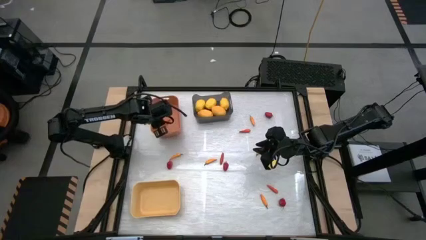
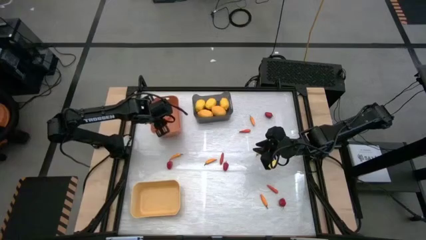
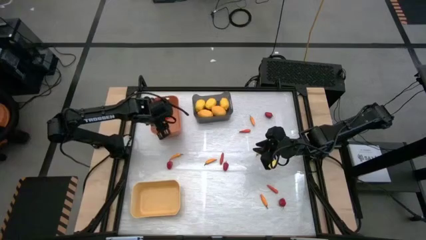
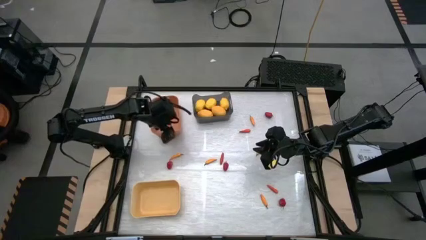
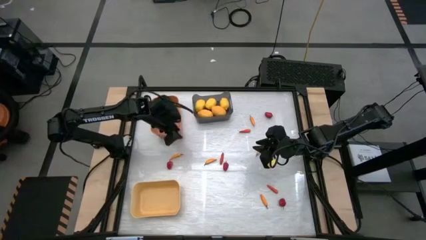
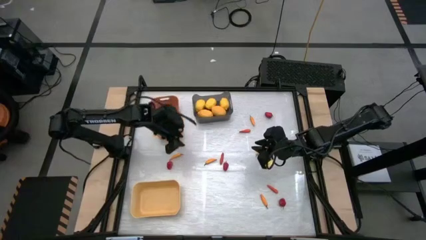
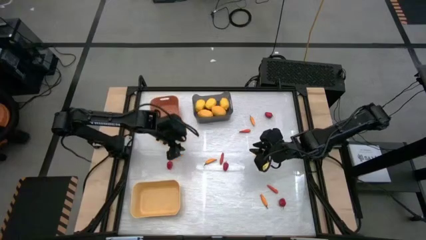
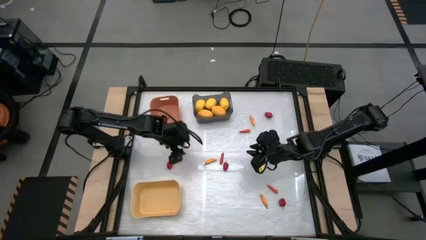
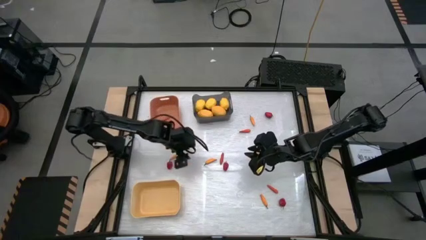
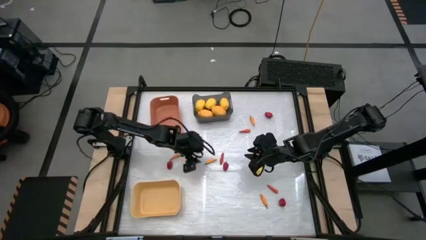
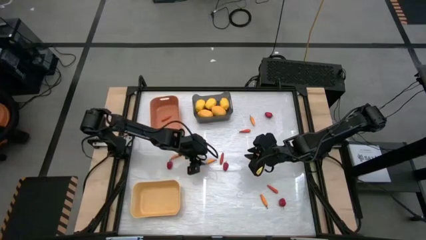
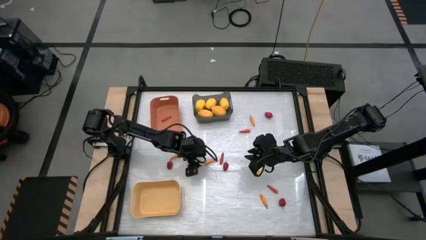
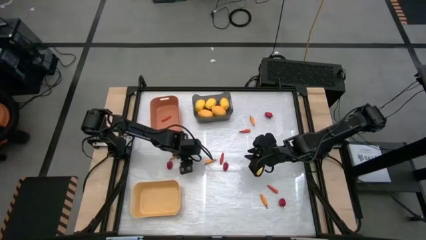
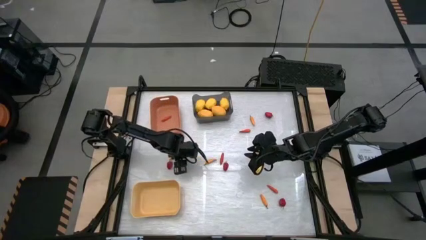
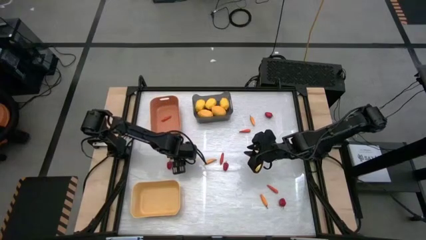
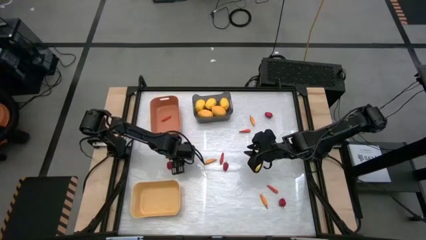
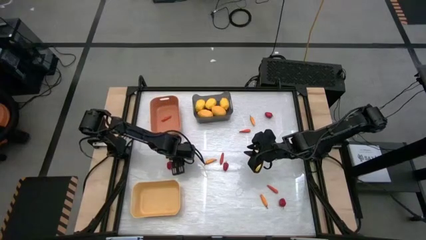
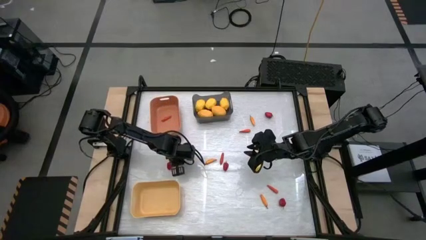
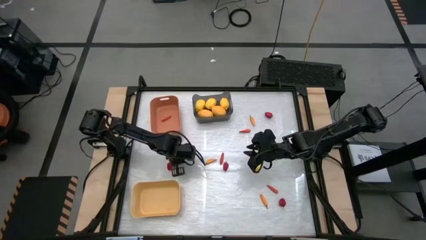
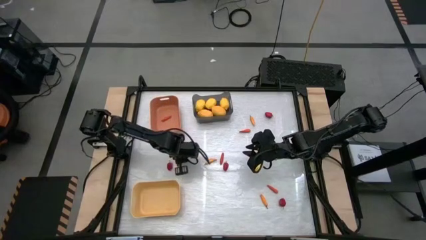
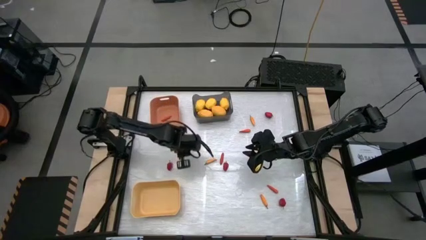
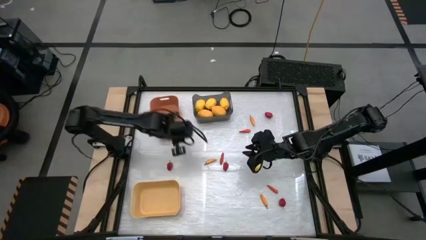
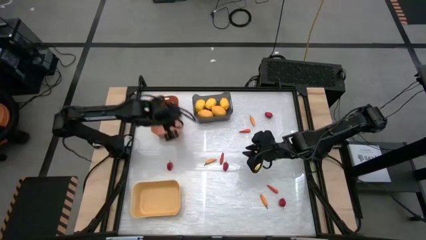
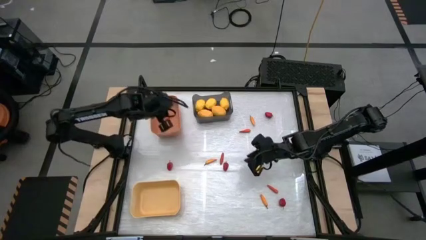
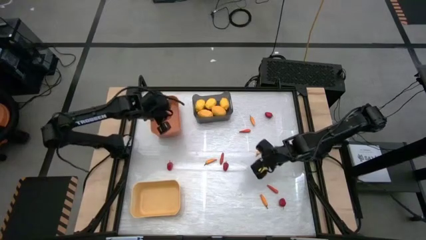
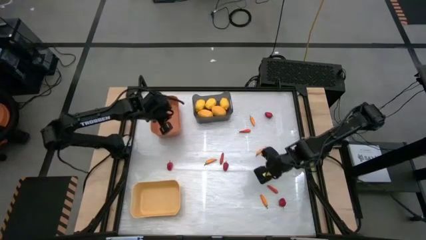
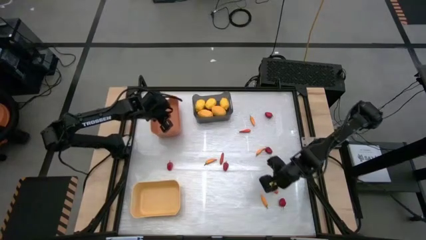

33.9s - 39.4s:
Task: Sort produce into baskets
Put the yellow chili pepper into the orange bin

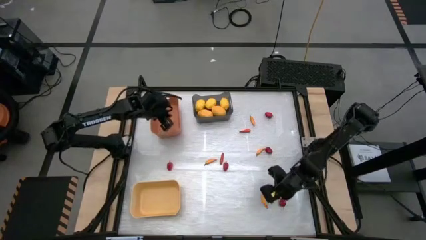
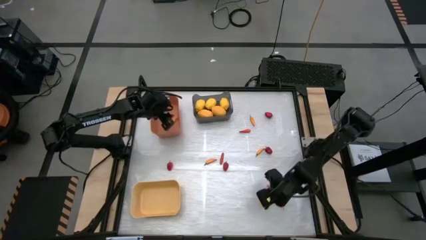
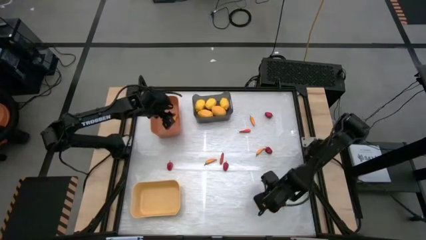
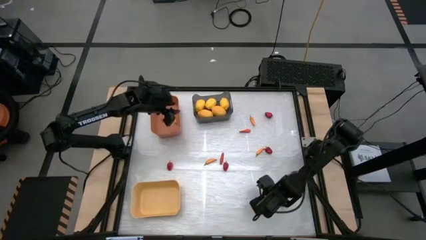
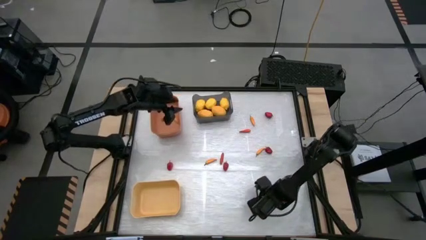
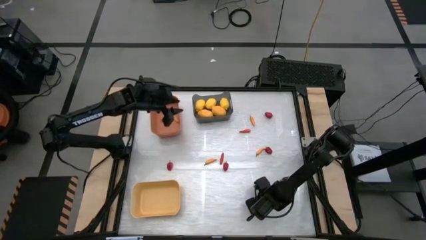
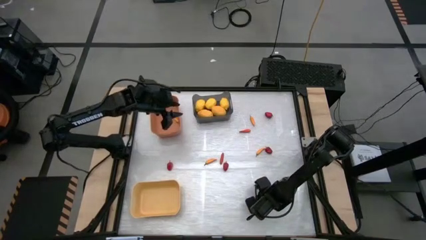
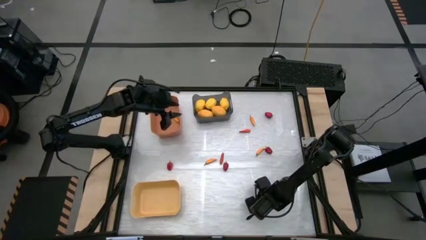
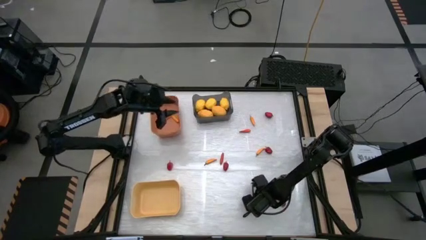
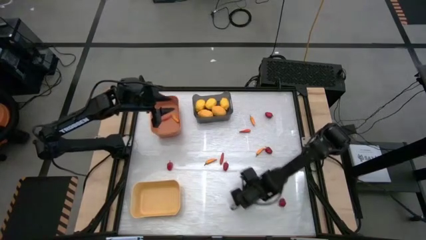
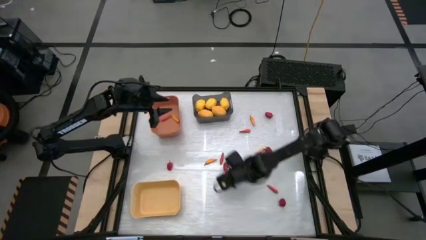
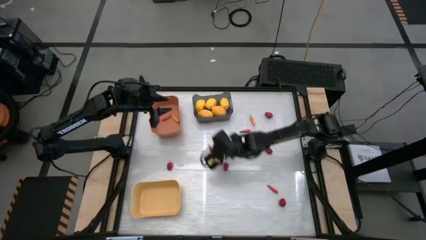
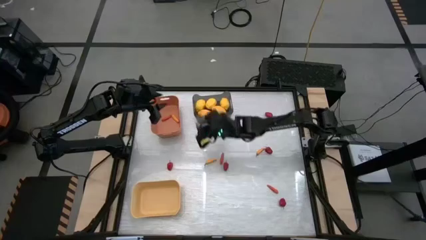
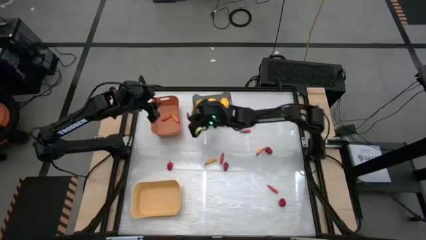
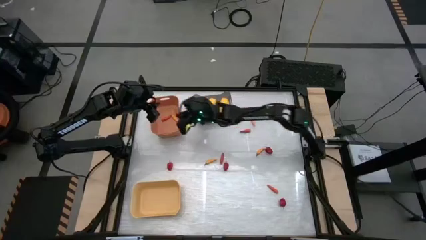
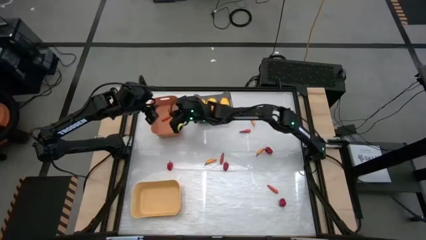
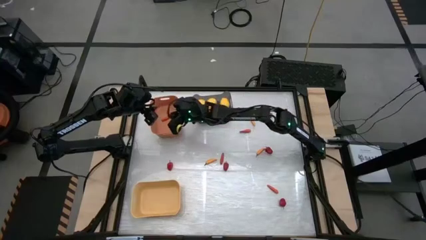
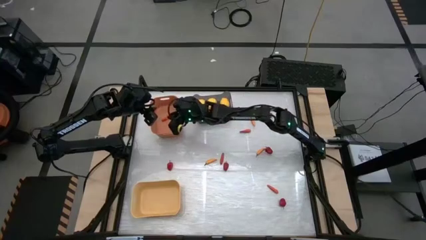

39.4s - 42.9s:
Put the yellow chili pepper into the orange bin

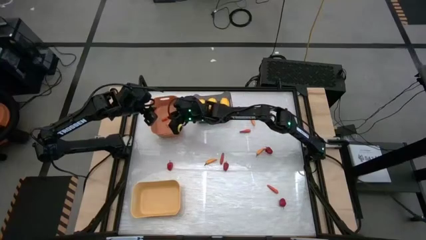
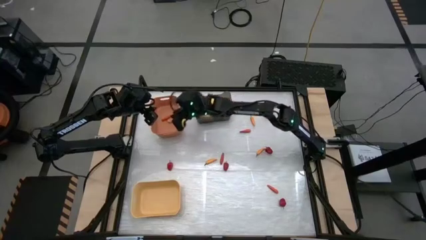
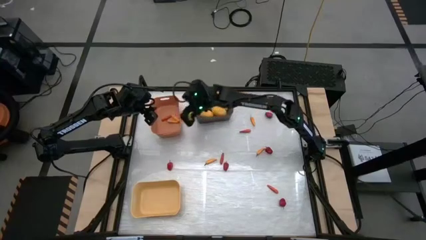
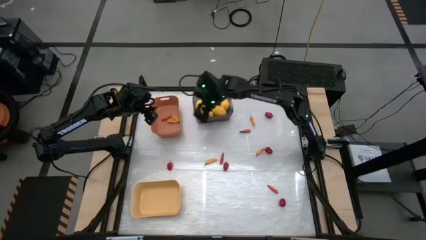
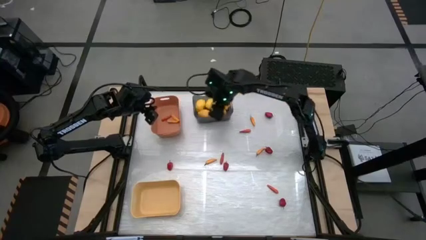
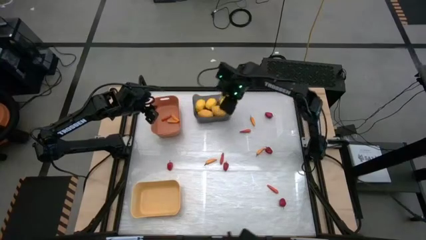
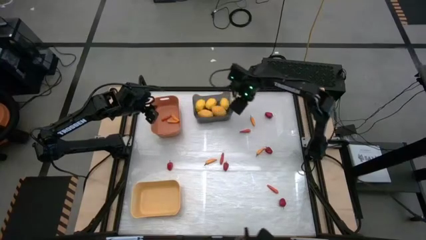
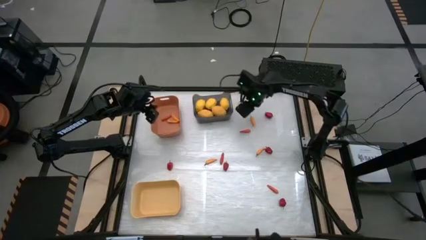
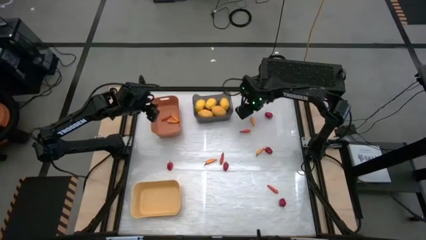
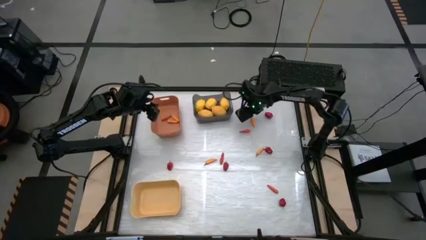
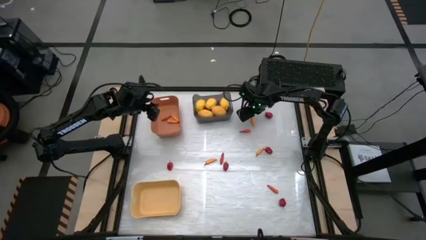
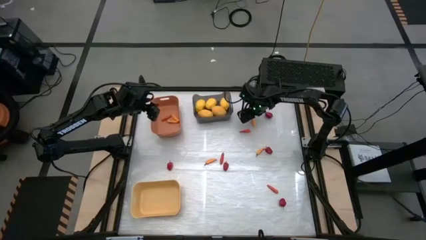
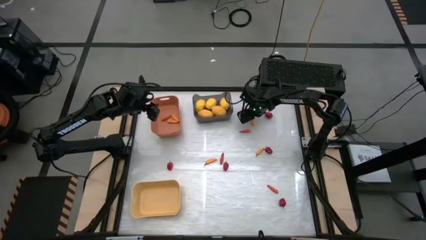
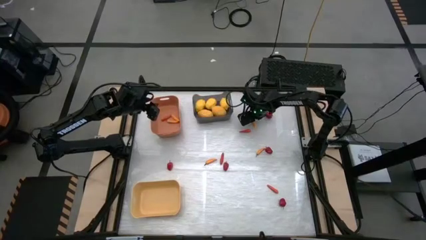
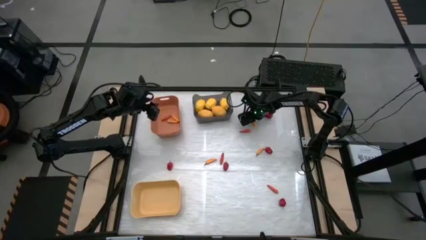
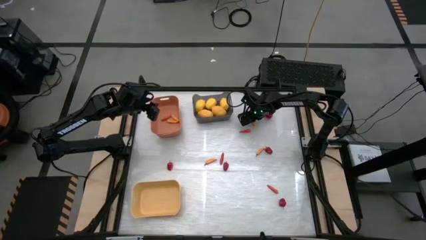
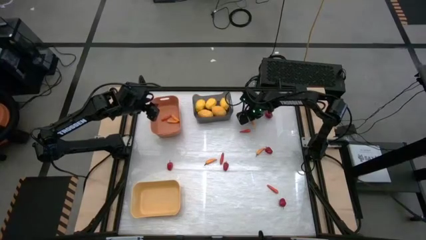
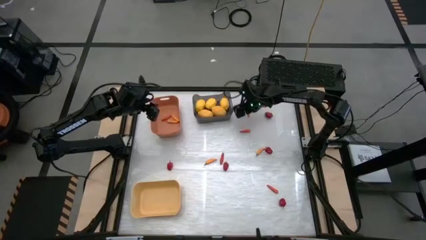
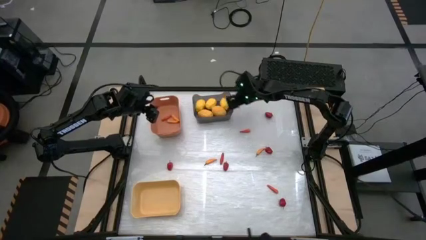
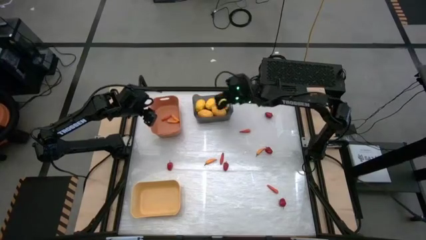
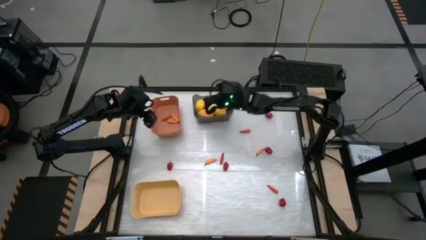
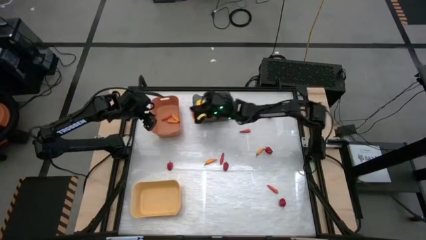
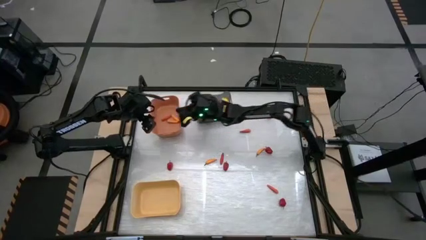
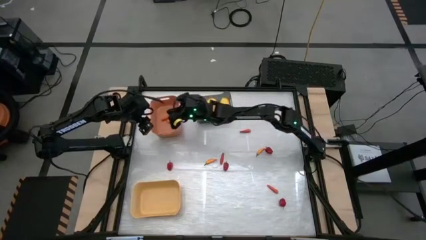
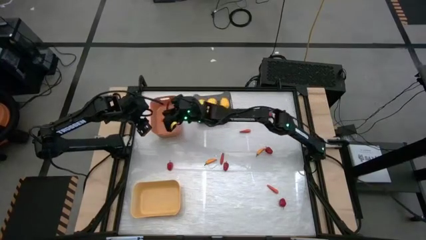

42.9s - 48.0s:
Put the yellow chili pepper into the orange bin

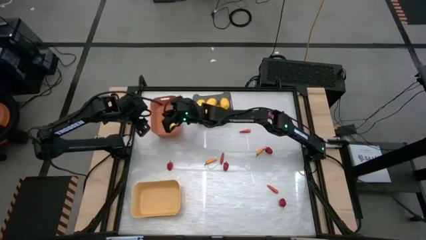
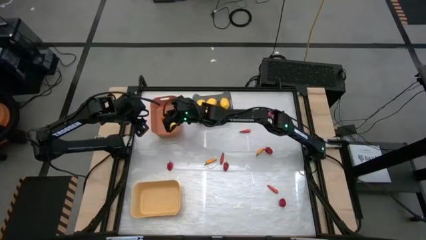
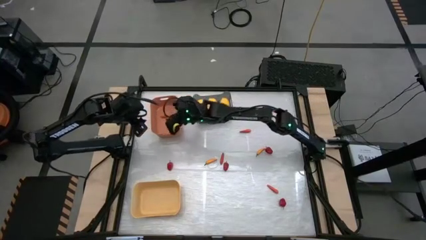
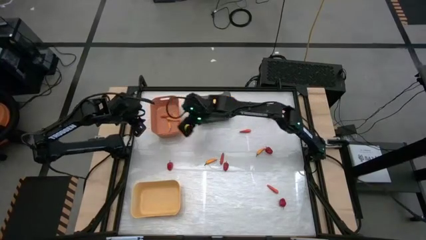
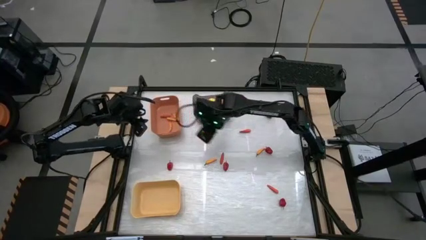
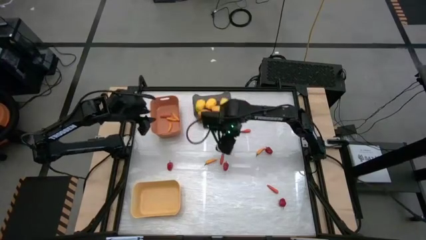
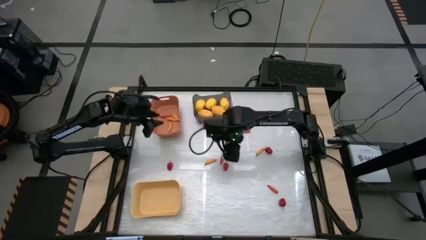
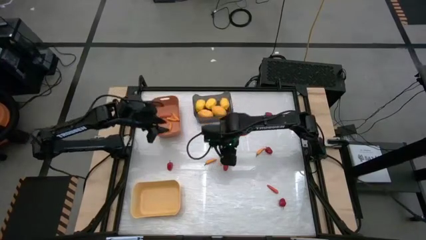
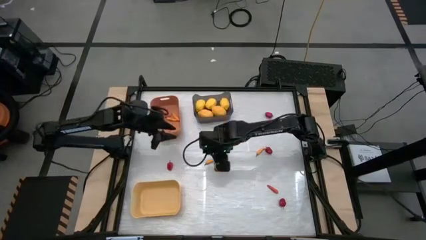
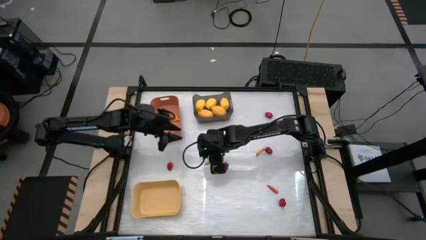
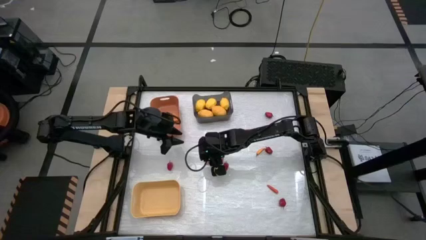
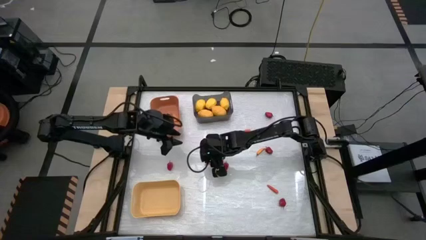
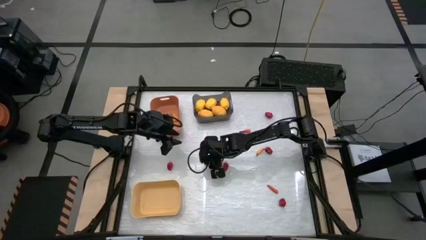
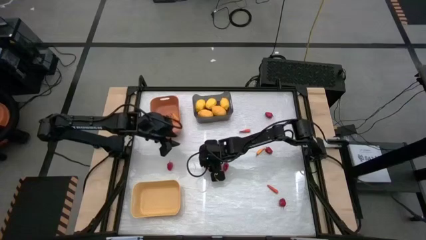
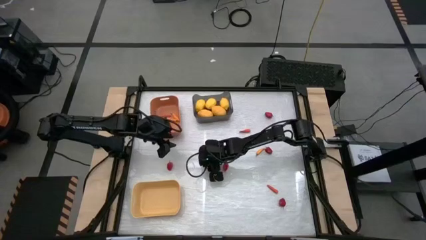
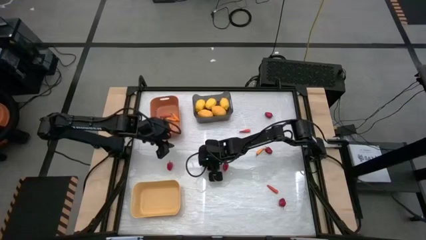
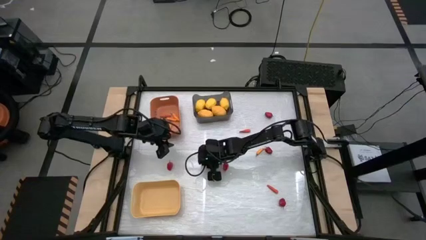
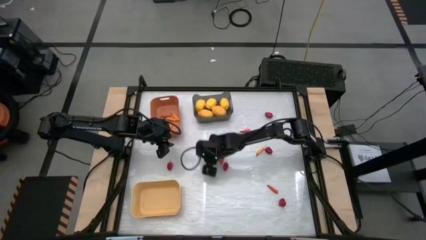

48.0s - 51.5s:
Put the yellow chili pepper into the orange bin
